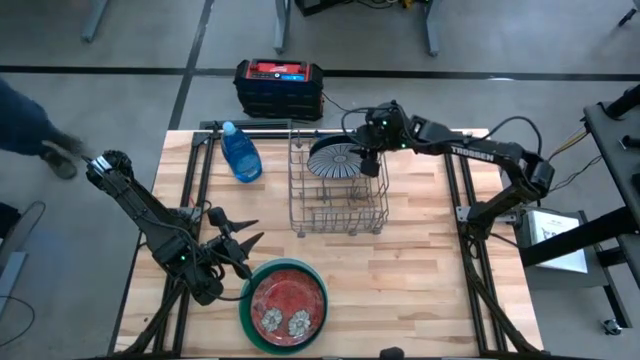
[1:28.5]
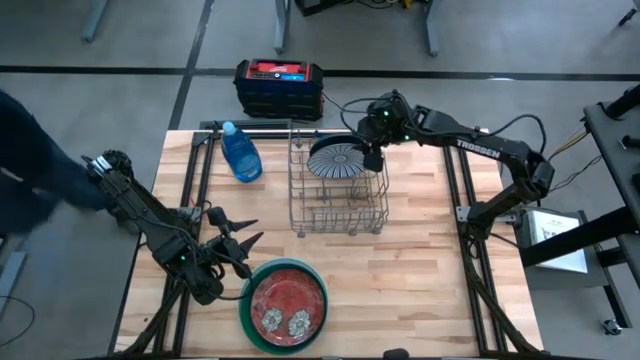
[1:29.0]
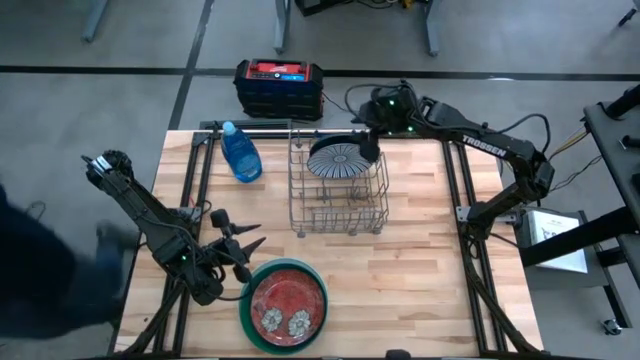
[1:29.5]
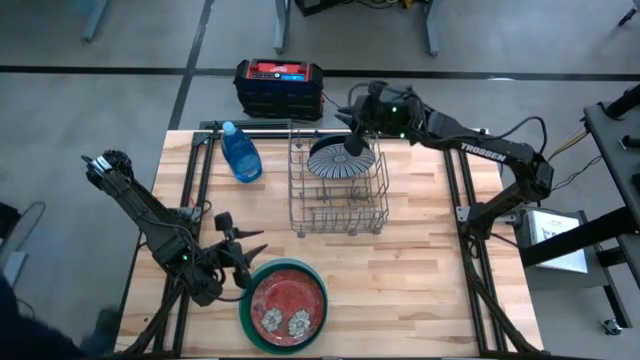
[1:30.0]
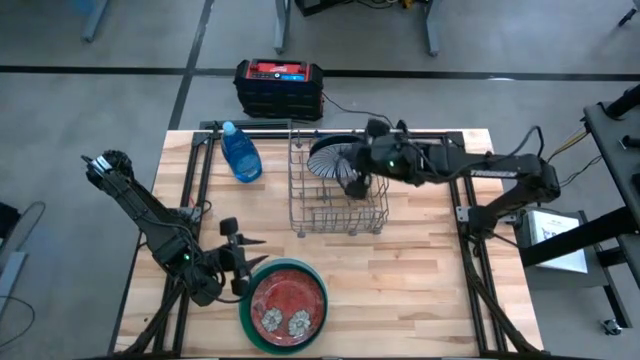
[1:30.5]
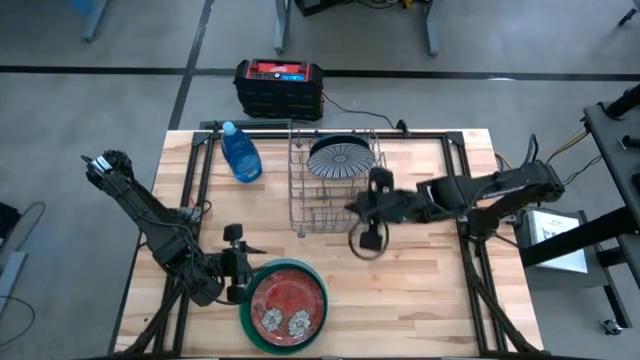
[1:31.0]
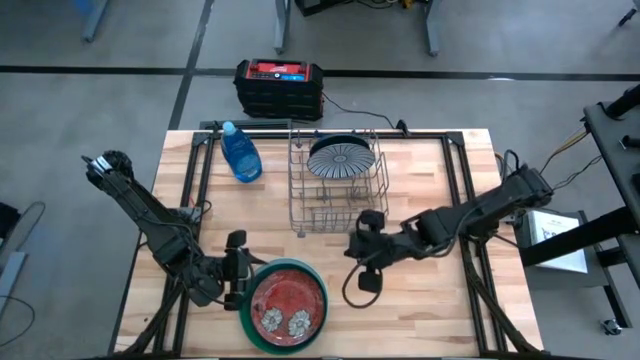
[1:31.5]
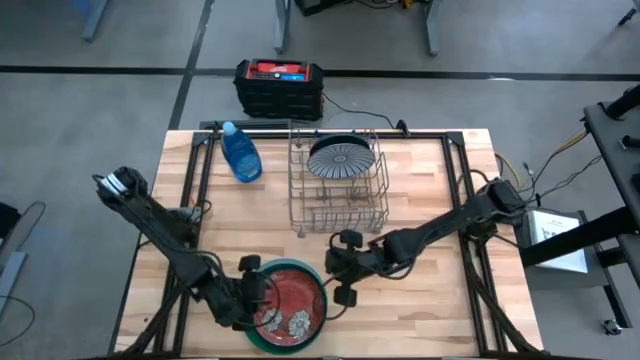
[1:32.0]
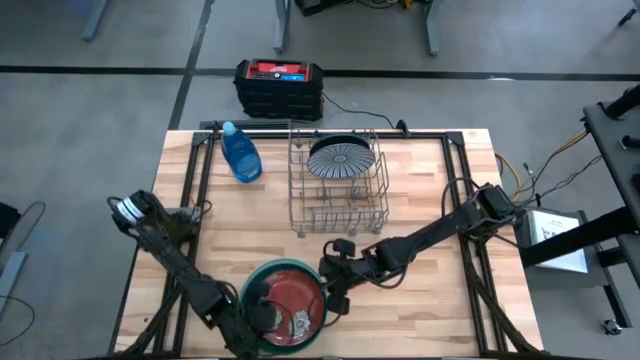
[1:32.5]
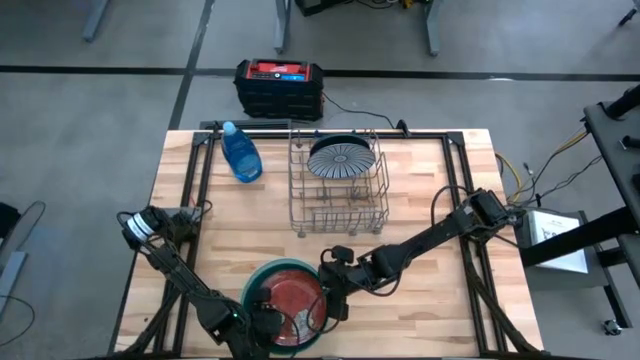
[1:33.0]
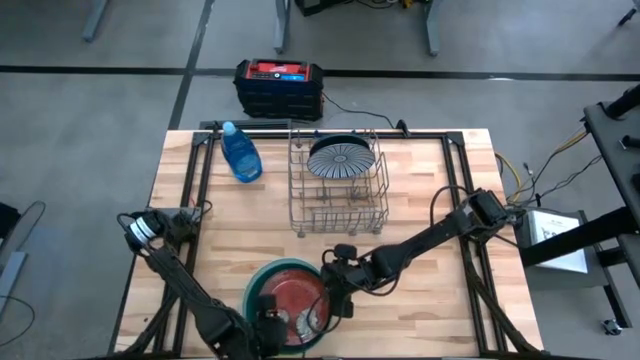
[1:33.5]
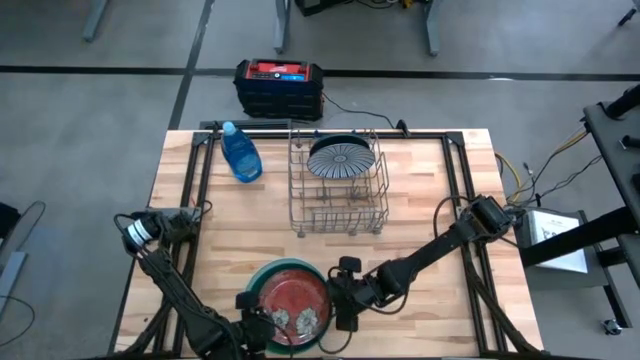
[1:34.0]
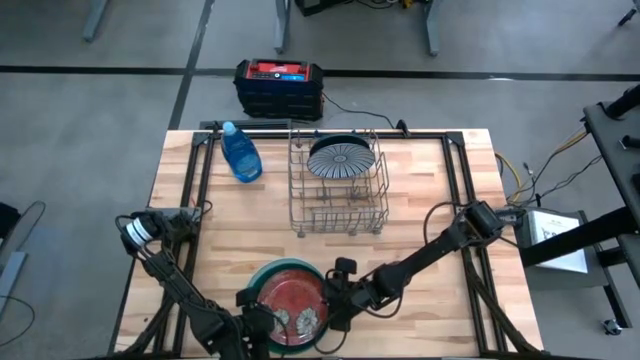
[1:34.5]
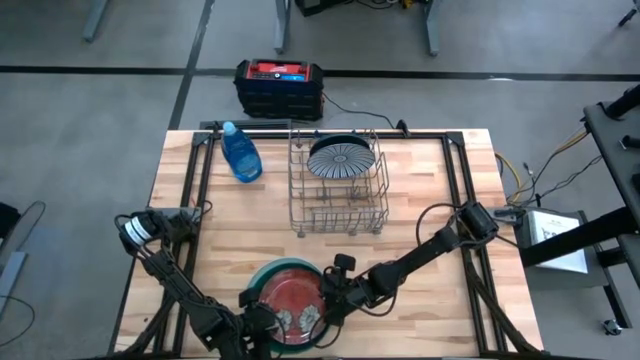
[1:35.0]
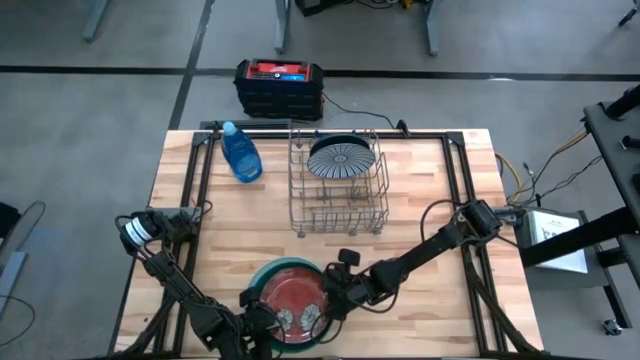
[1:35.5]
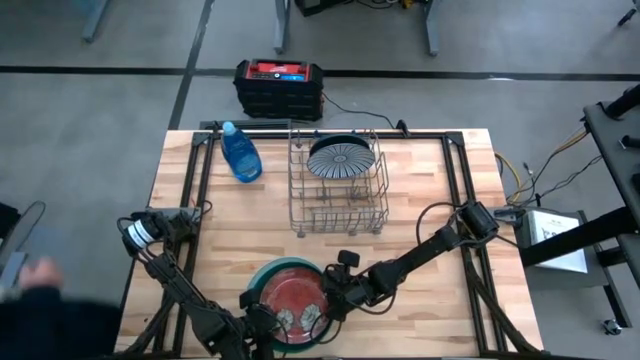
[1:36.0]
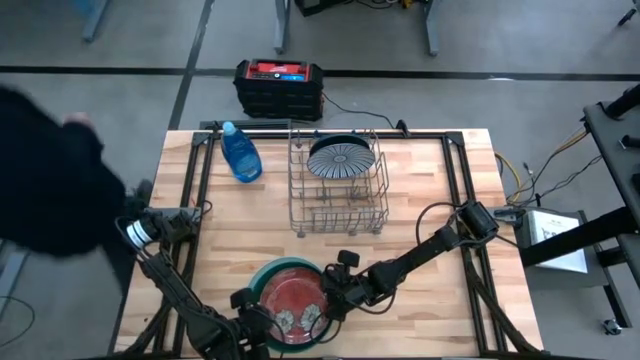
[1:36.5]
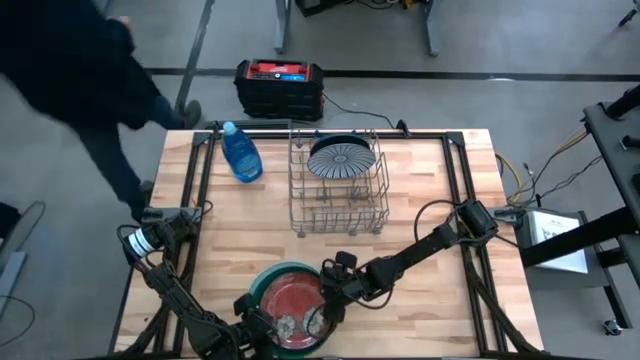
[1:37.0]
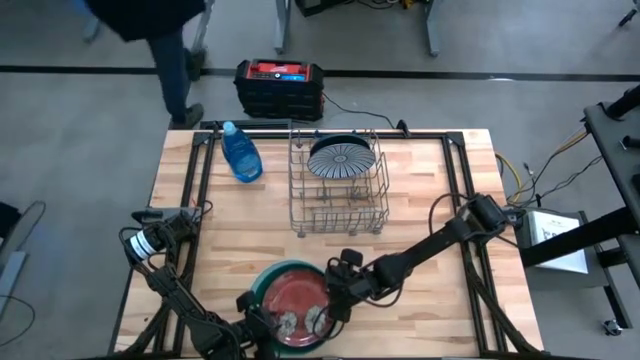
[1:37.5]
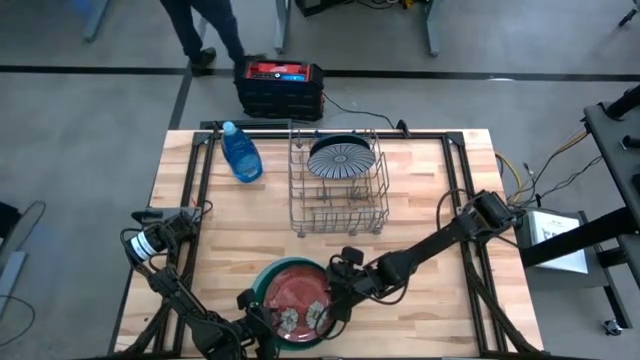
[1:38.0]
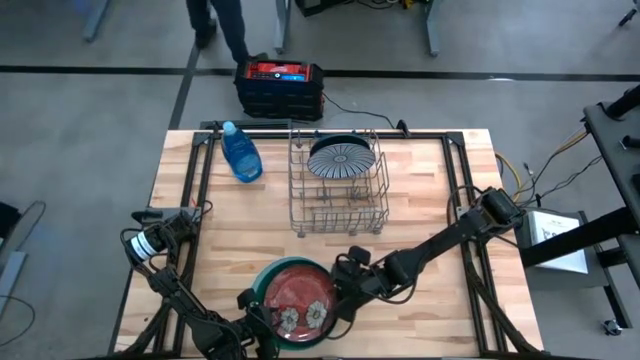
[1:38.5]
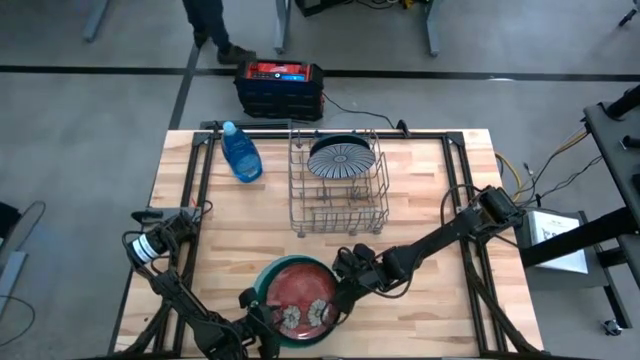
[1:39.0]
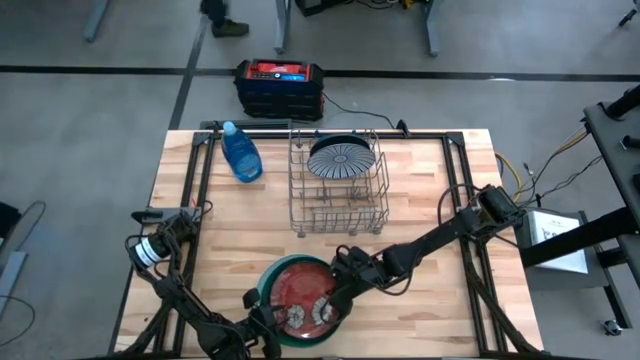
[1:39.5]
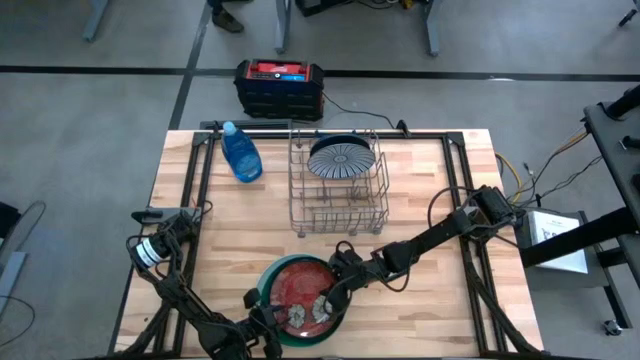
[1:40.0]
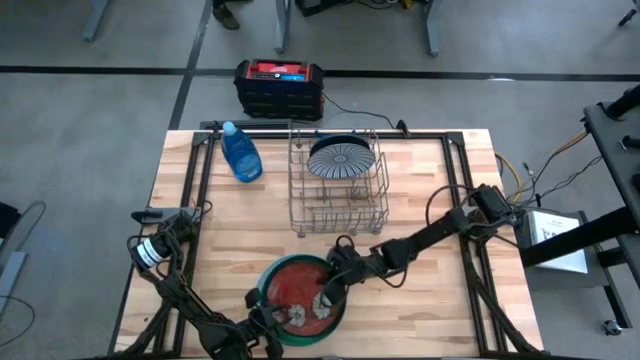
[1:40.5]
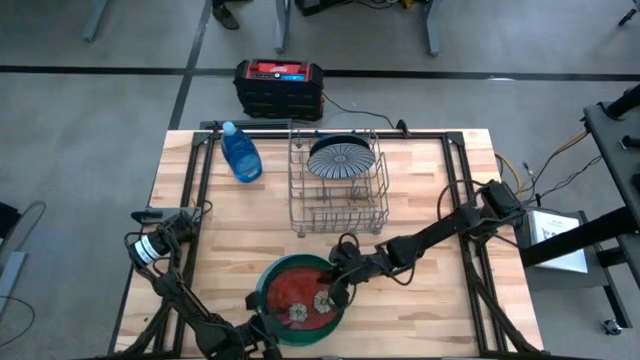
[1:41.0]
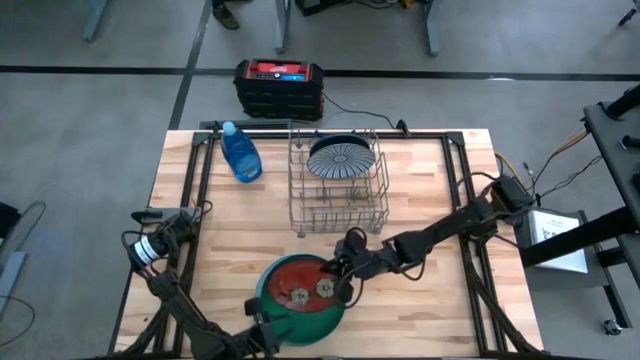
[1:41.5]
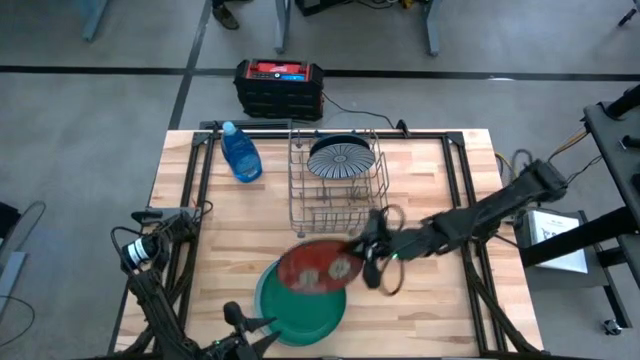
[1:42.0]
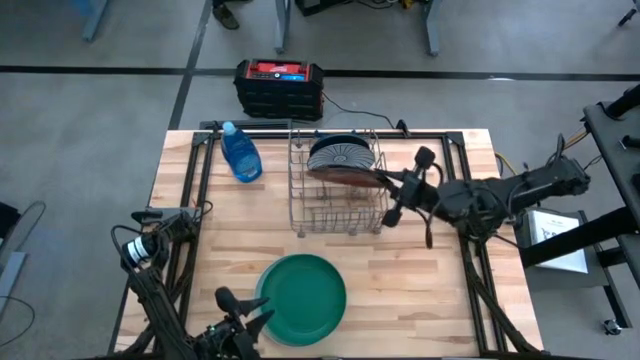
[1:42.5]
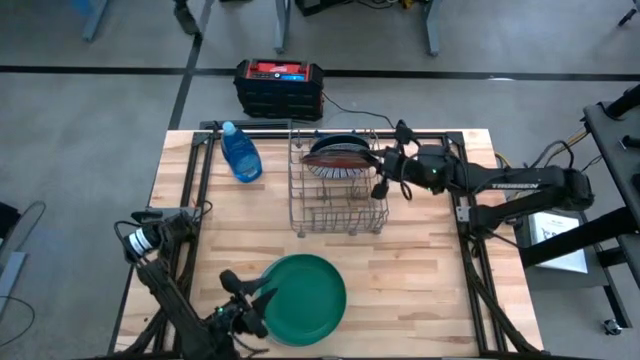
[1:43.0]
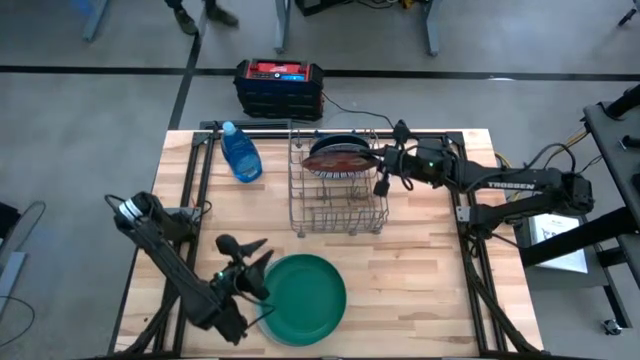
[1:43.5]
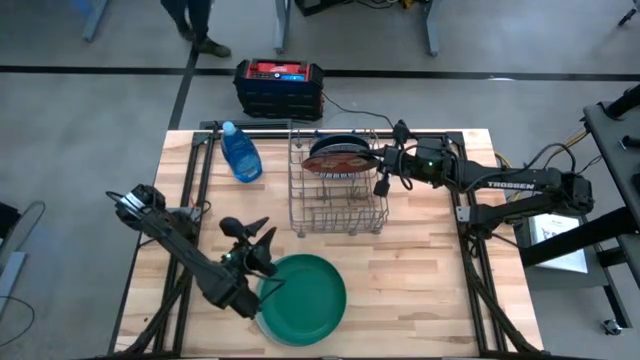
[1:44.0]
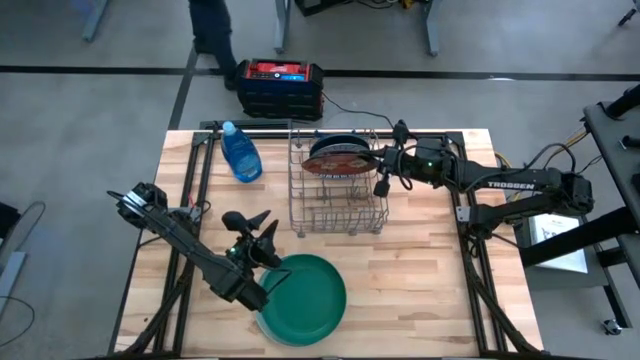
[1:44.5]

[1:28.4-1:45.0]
Task: Sort dishes
Put the red flowered plate into the gray dishwasher rack

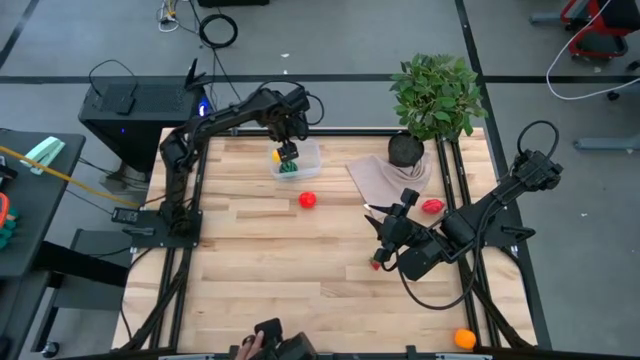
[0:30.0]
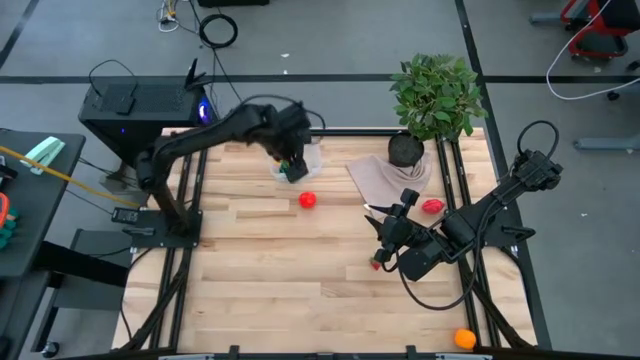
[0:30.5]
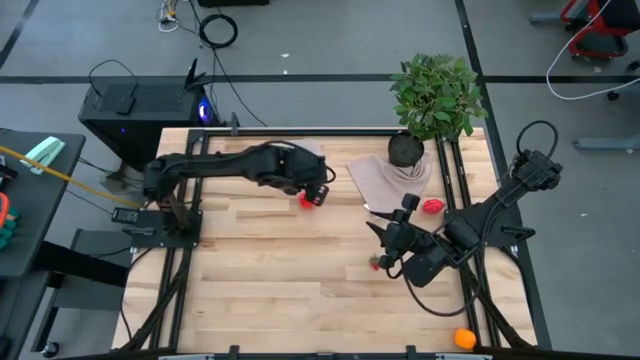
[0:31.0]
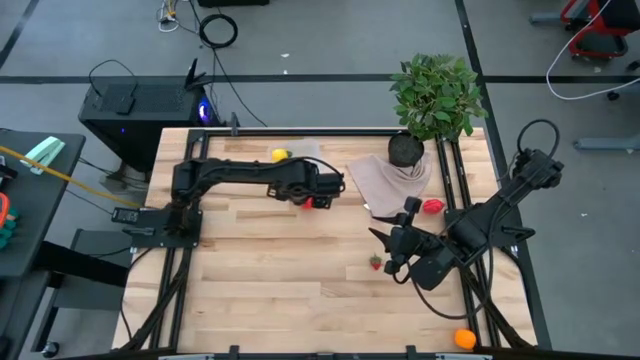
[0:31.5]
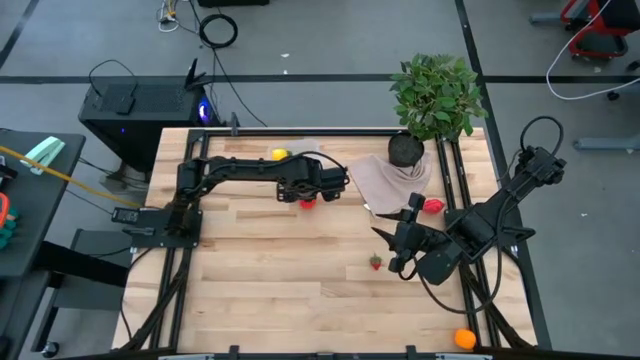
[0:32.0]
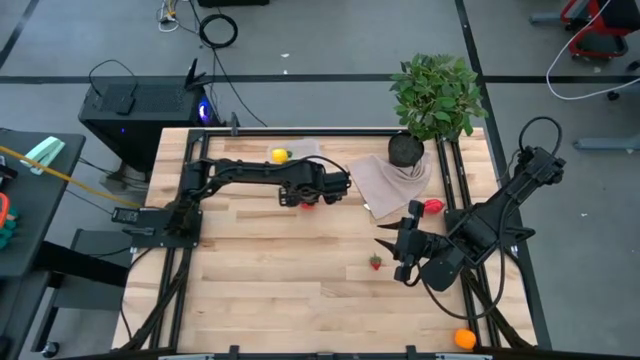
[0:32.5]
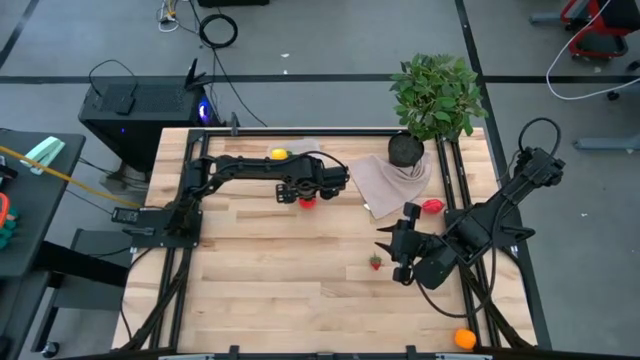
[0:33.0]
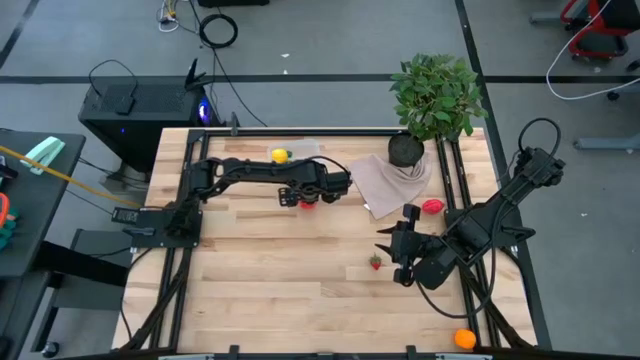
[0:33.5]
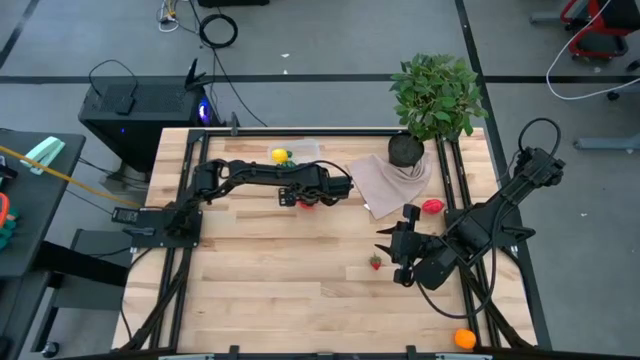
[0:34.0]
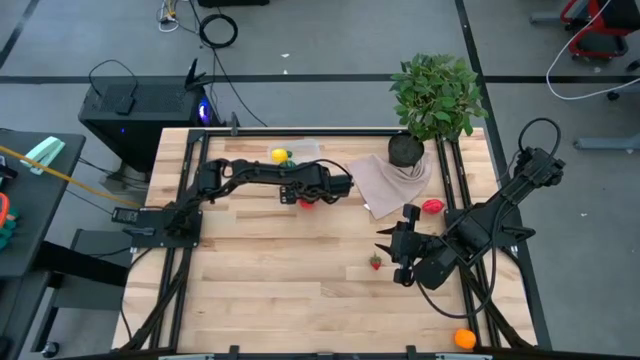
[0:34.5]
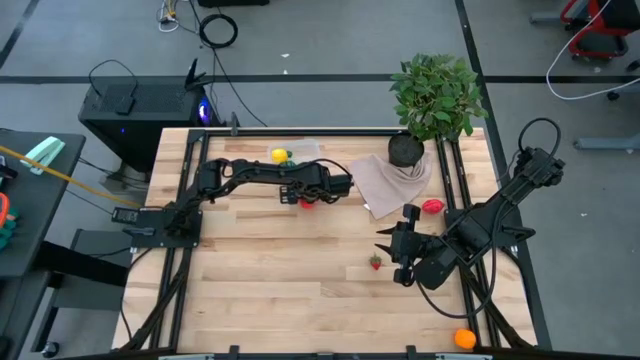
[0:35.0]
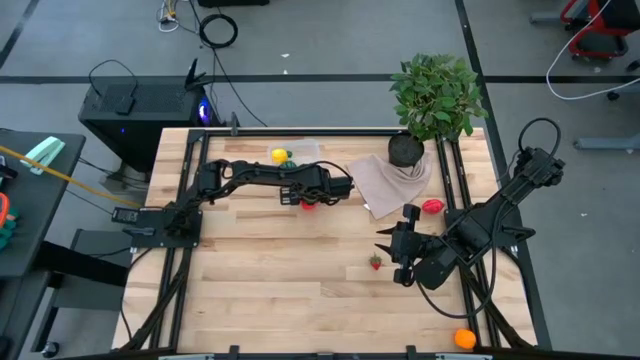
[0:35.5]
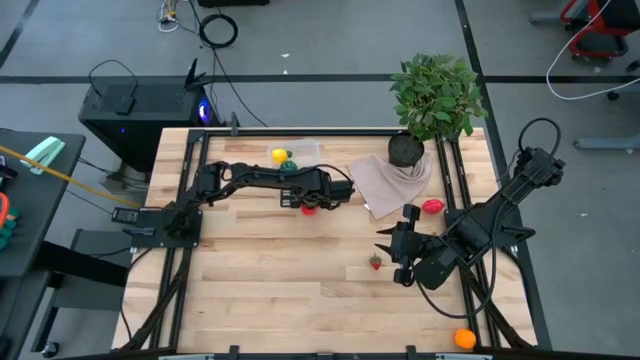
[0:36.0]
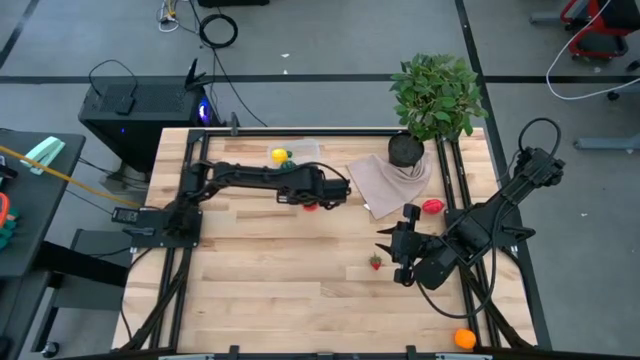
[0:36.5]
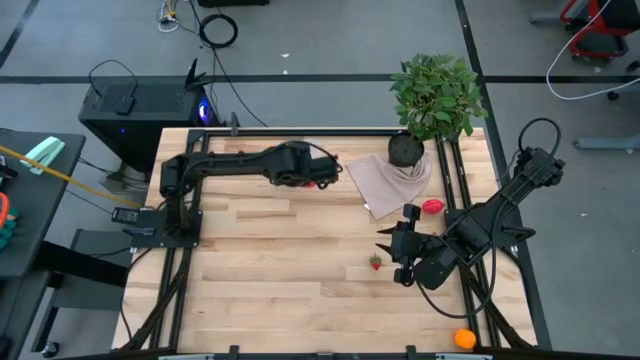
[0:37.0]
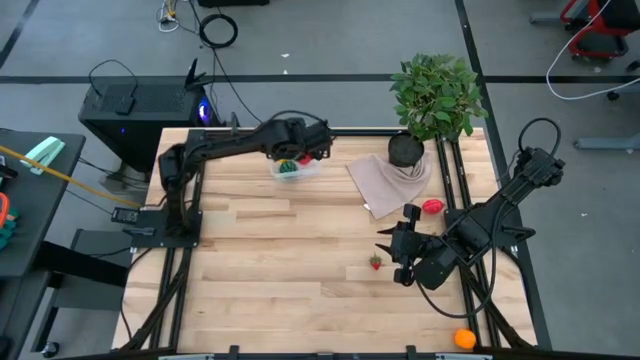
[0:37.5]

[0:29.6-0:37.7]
Task: Pick and placing Produce into tupperware
Put the red apple into the container
